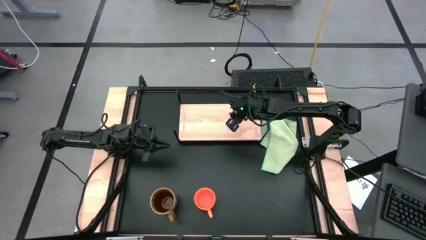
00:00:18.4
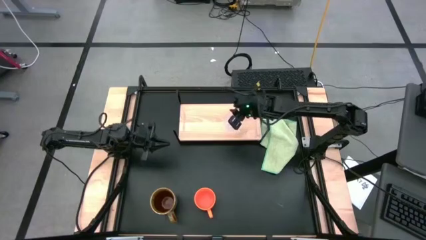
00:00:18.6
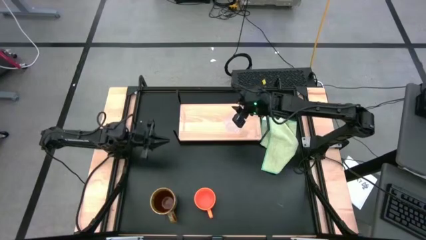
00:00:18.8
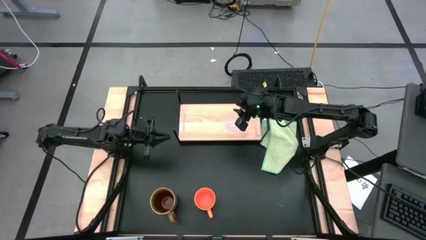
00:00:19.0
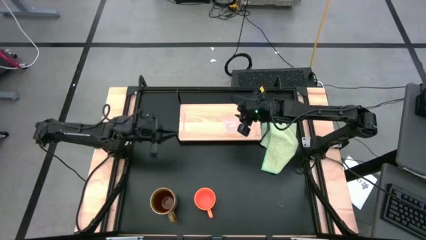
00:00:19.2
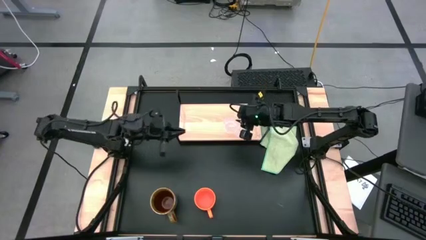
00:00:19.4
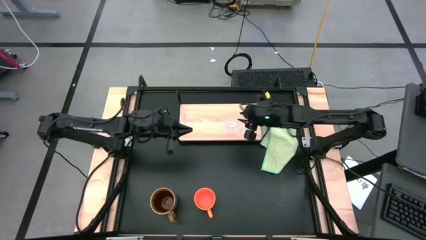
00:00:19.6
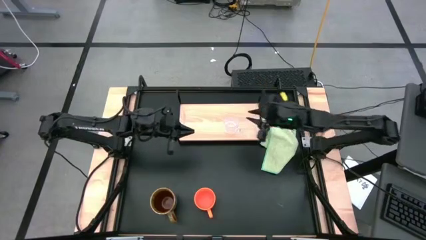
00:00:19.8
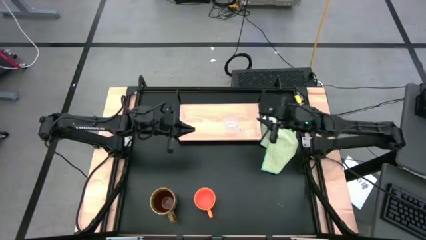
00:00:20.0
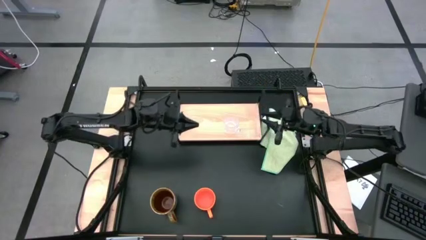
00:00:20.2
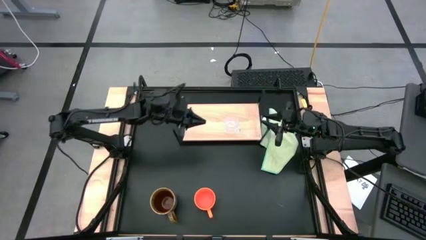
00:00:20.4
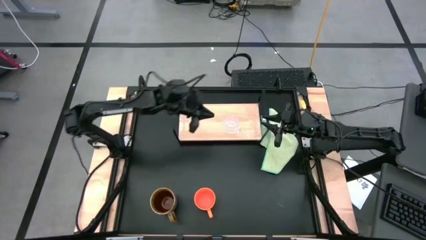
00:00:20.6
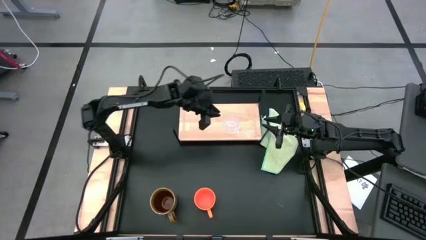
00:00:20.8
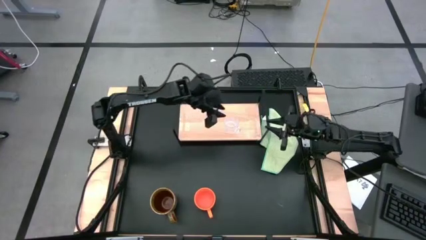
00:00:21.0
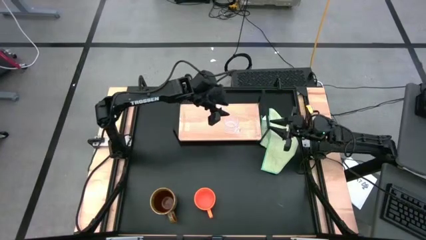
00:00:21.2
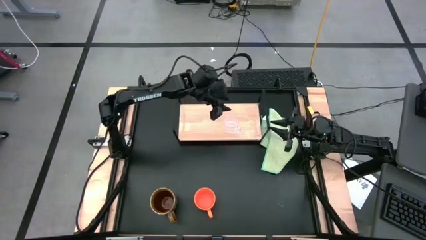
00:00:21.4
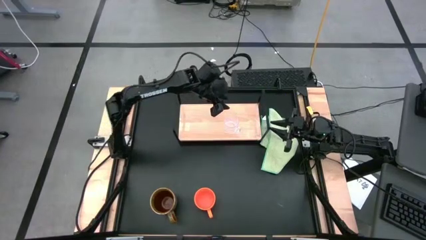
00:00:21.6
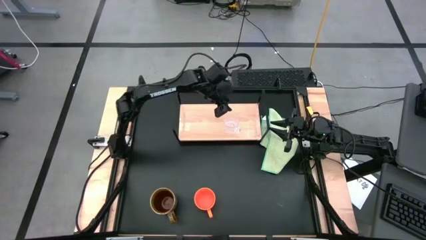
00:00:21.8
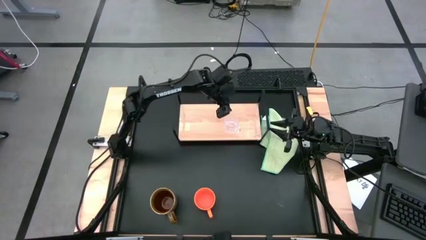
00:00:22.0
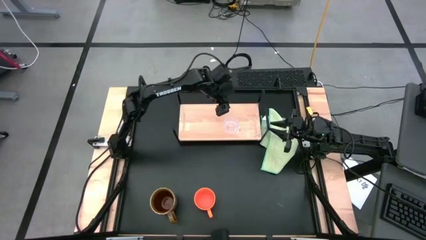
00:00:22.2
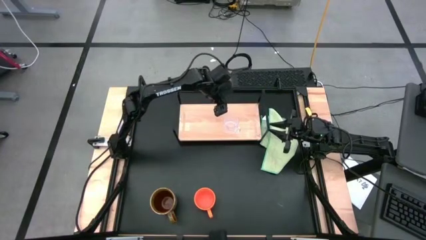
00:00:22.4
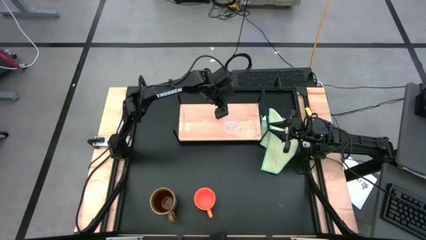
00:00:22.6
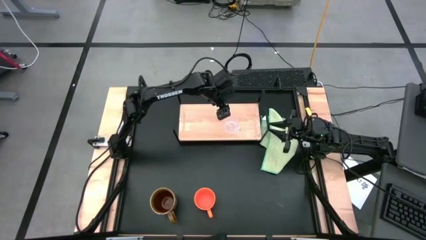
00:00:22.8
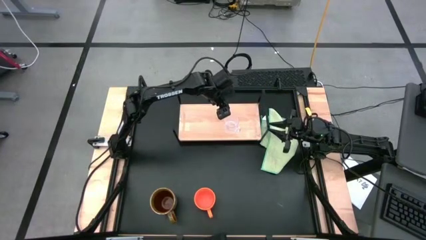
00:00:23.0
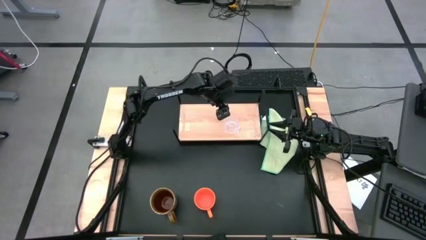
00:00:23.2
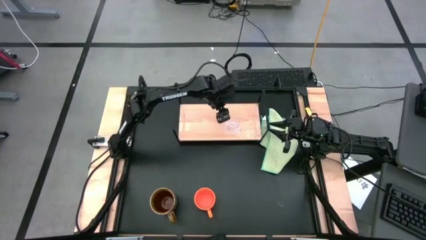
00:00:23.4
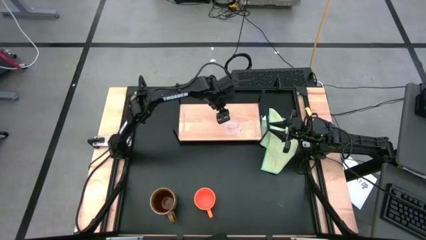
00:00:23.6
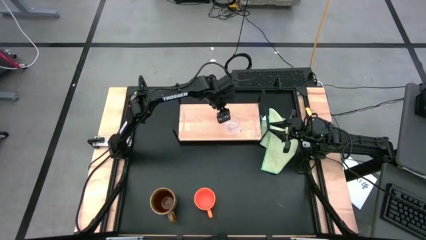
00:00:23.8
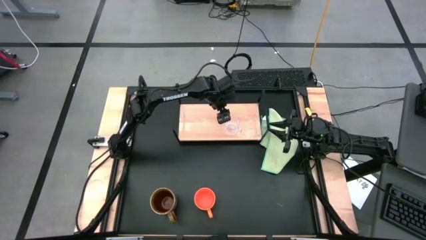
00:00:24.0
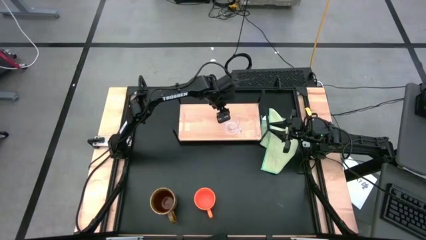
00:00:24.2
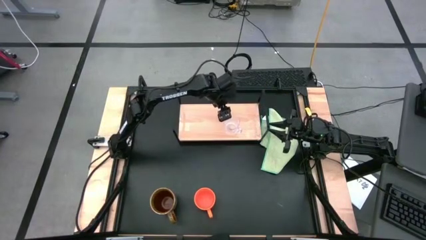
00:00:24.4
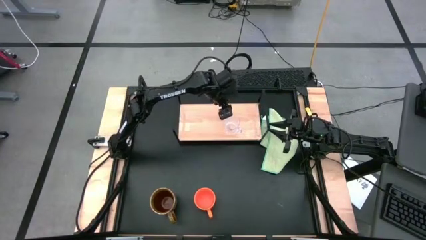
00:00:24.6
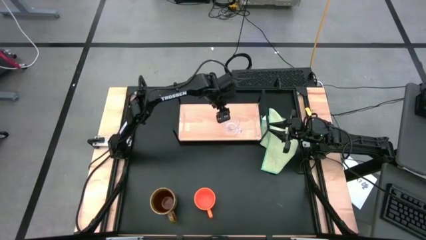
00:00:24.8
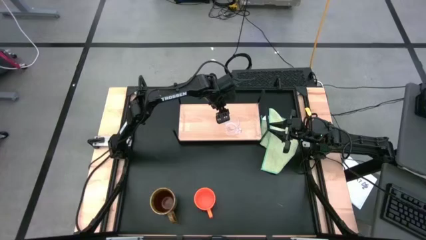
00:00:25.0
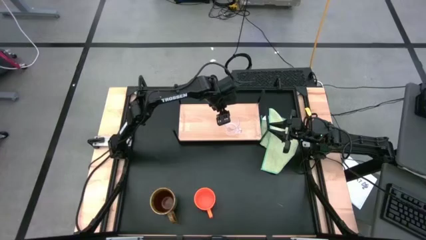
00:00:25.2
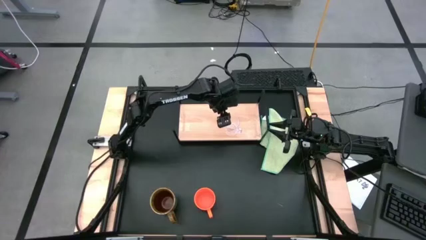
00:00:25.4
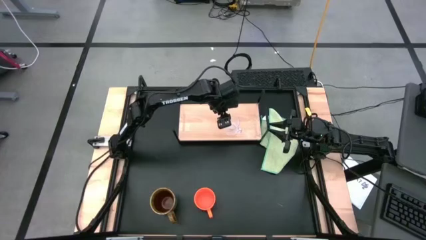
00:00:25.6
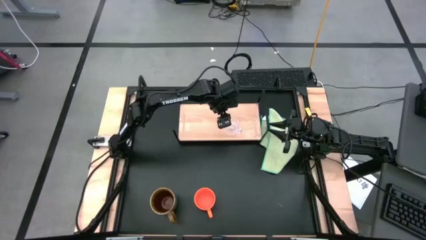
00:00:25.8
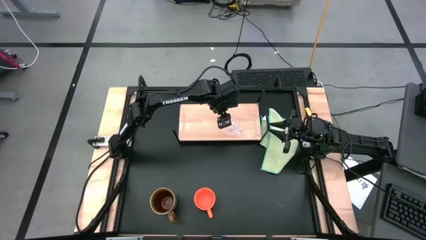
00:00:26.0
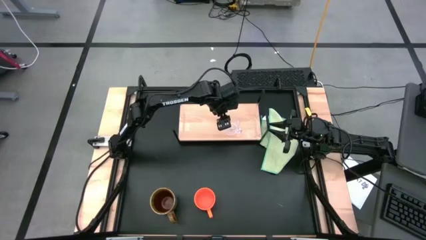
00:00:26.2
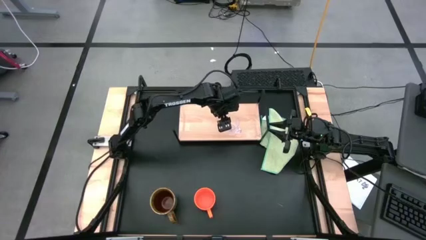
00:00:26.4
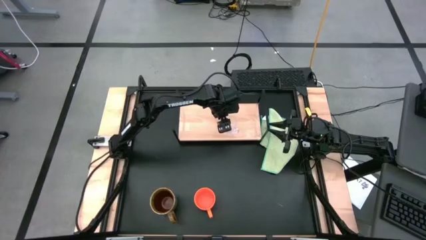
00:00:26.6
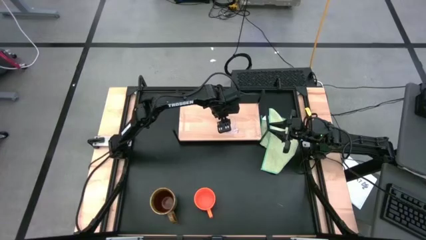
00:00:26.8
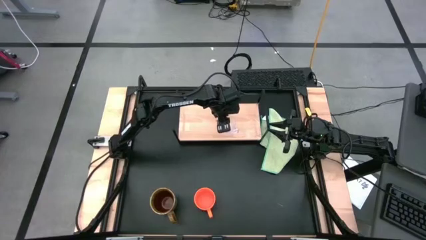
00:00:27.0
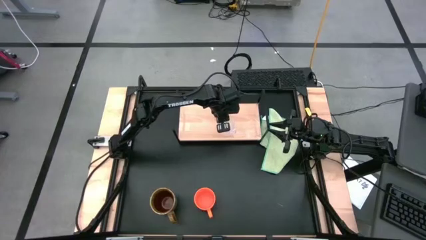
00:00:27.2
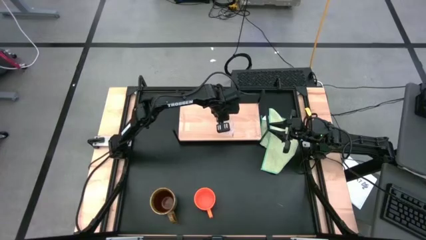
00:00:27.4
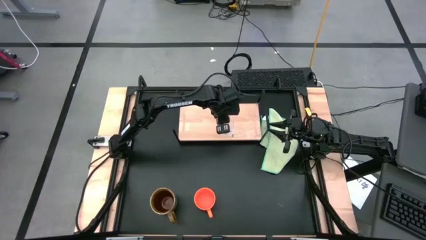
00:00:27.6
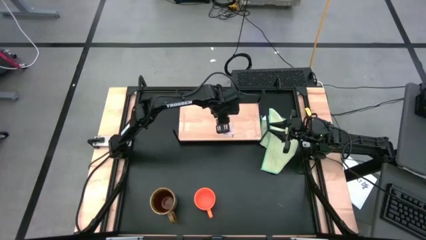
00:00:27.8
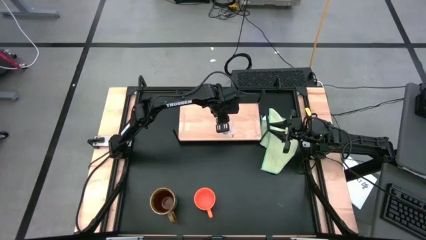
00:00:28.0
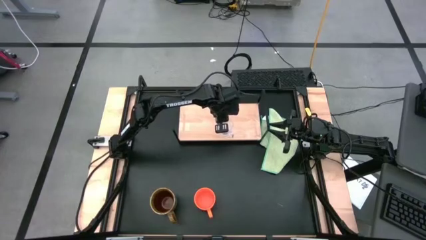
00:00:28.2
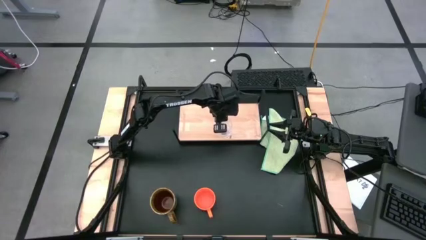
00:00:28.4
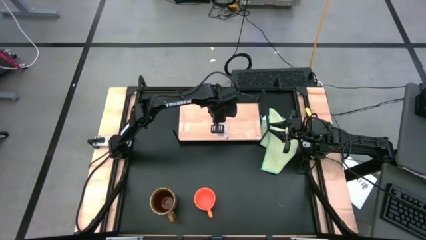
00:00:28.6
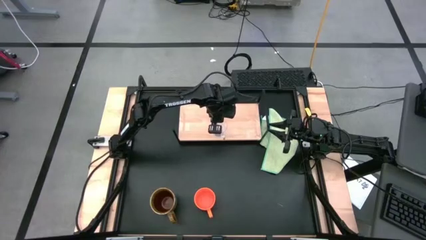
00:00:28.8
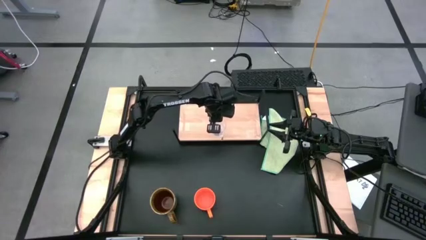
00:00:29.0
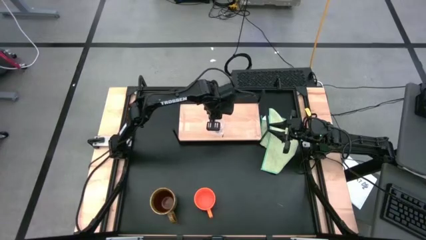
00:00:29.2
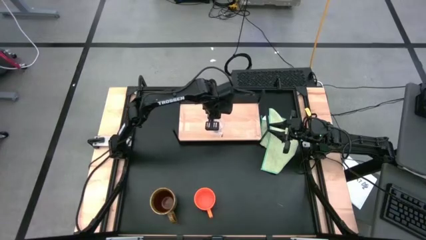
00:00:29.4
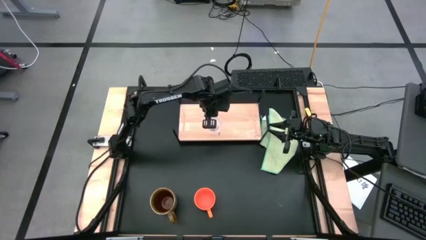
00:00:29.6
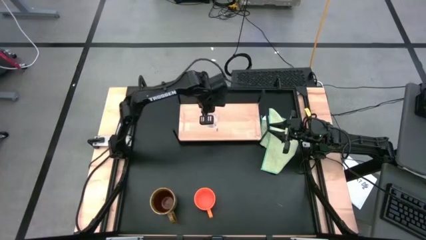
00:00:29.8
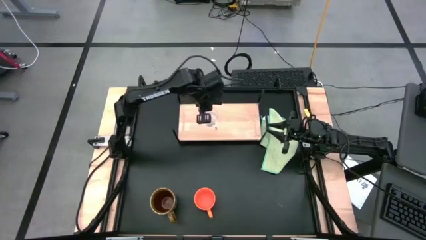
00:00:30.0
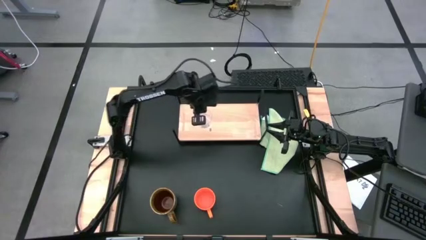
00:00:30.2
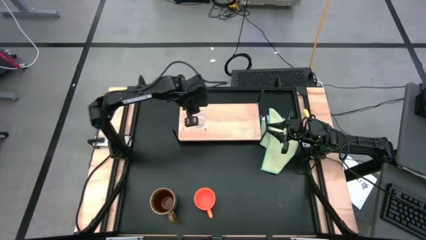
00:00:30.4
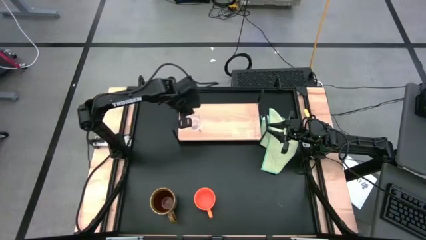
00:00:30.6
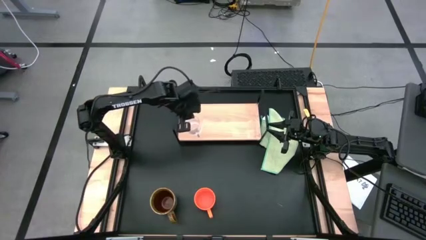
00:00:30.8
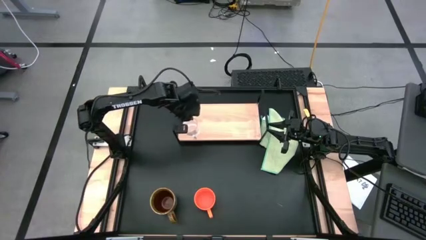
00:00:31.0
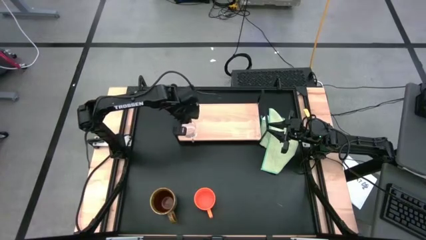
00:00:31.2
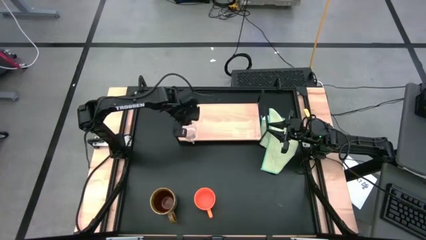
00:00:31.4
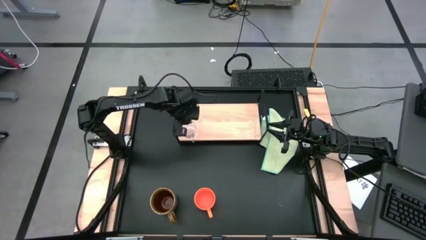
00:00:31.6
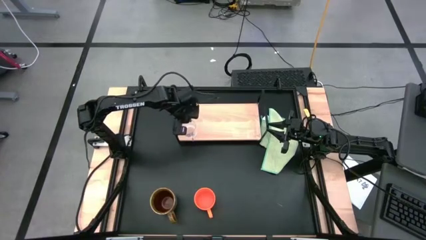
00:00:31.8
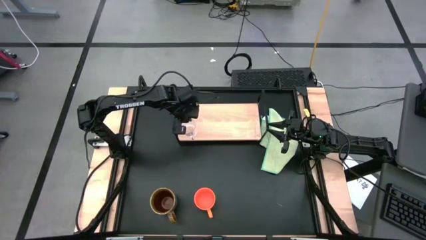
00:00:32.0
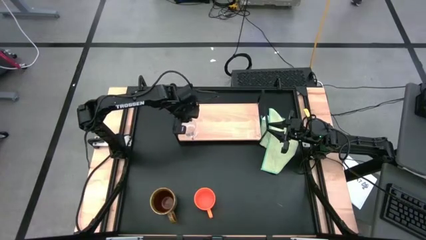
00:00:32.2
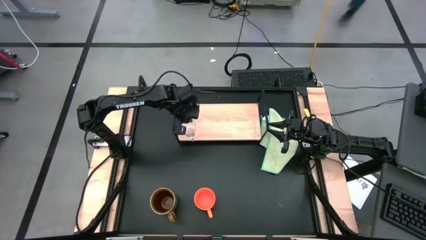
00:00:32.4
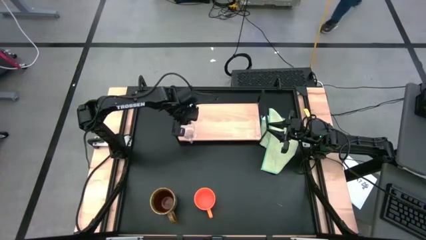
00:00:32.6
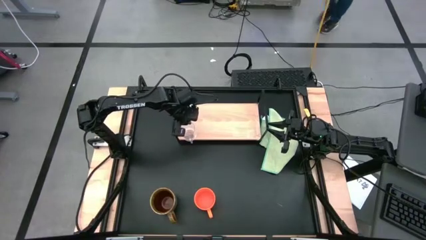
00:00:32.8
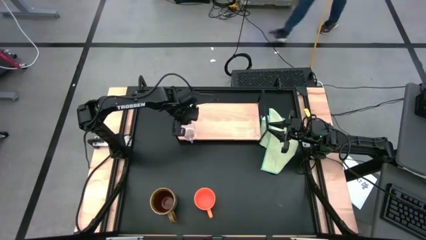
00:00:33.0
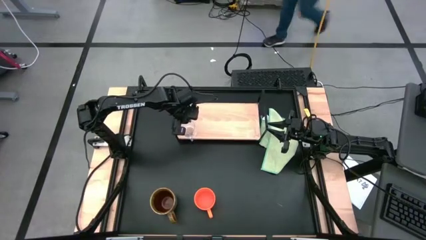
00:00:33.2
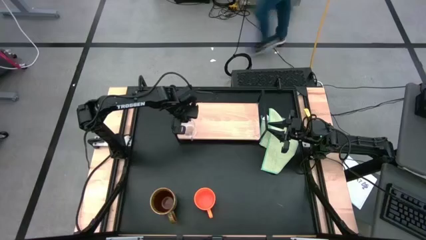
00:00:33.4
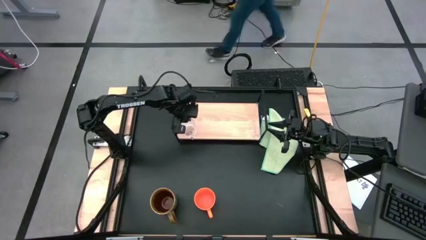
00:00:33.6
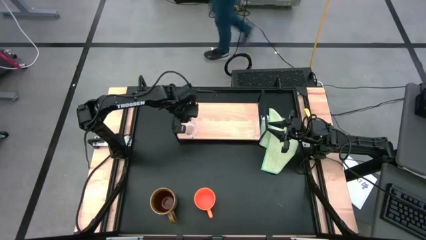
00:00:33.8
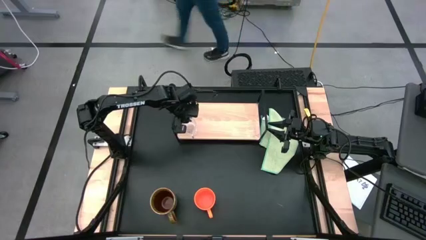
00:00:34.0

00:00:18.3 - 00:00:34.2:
Task: Stack small to large cups/mugs on shelf
Put the transparent mug on the shelf
